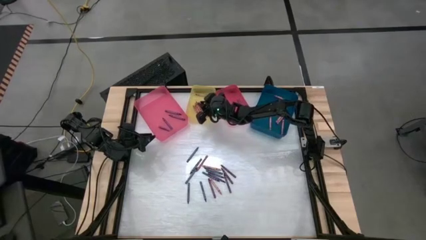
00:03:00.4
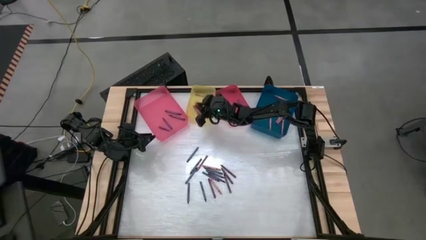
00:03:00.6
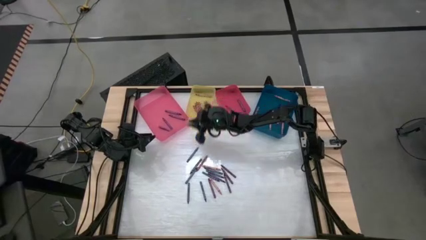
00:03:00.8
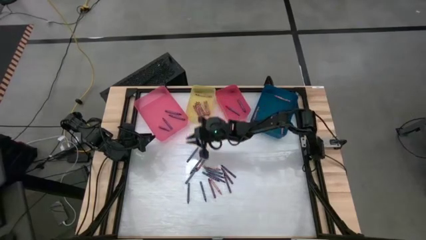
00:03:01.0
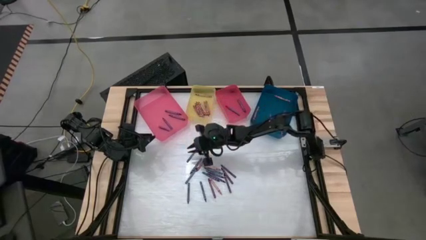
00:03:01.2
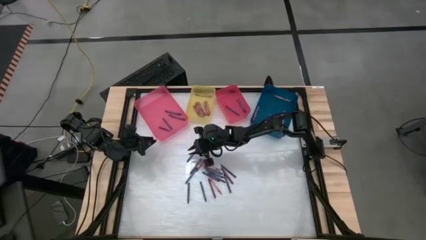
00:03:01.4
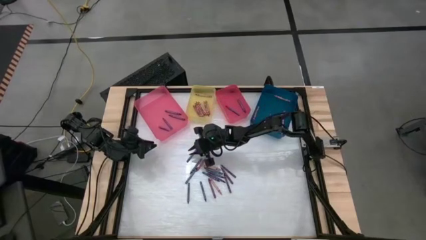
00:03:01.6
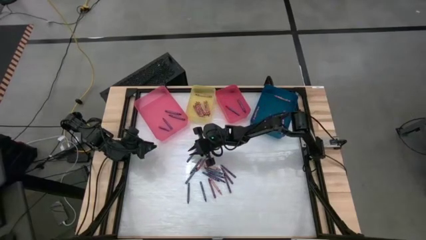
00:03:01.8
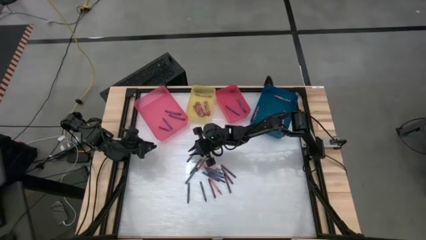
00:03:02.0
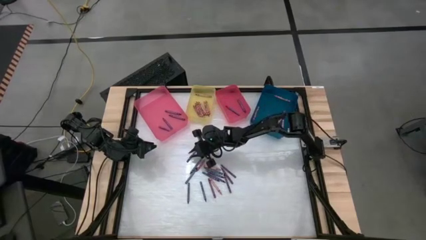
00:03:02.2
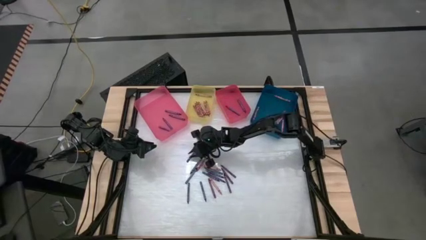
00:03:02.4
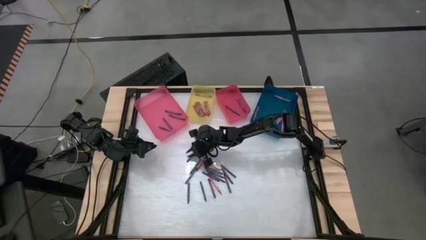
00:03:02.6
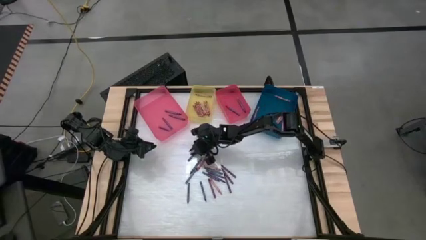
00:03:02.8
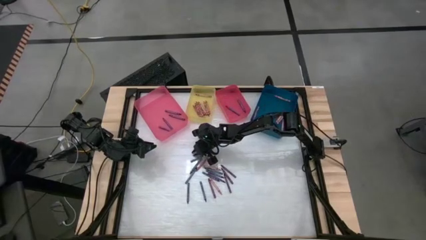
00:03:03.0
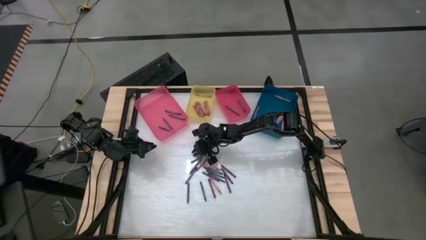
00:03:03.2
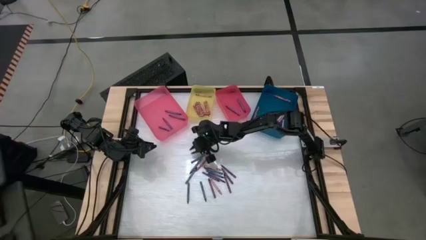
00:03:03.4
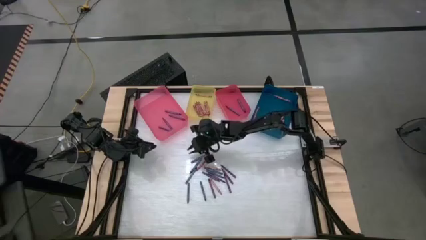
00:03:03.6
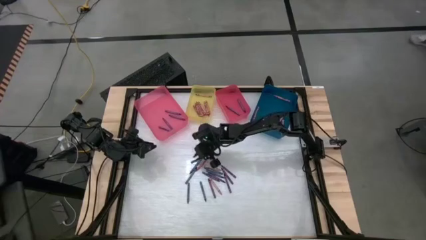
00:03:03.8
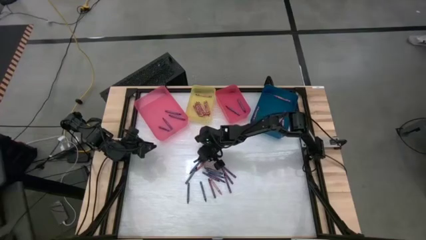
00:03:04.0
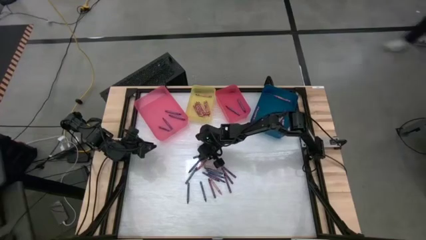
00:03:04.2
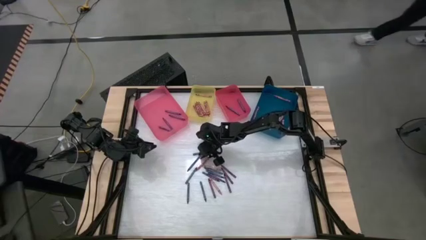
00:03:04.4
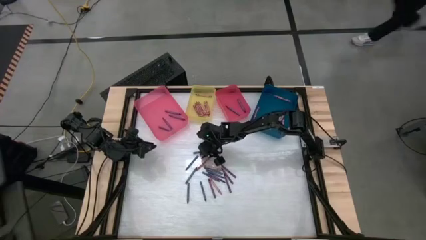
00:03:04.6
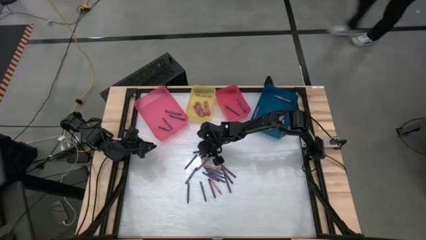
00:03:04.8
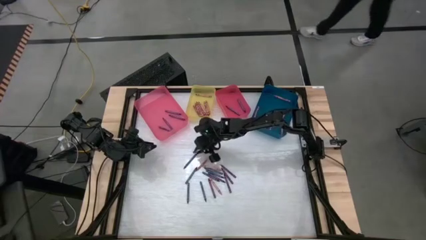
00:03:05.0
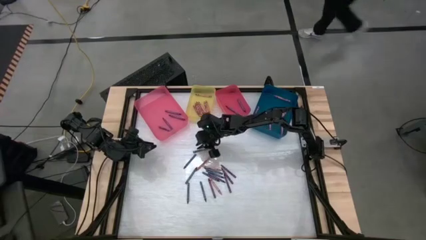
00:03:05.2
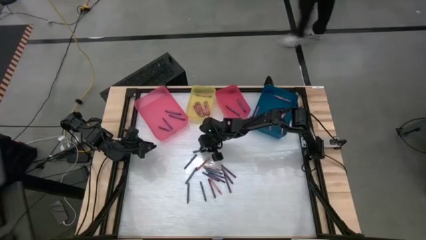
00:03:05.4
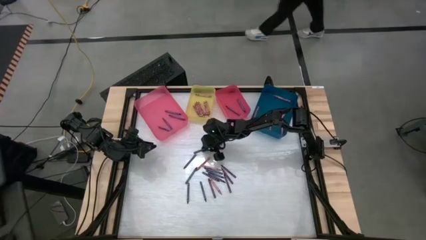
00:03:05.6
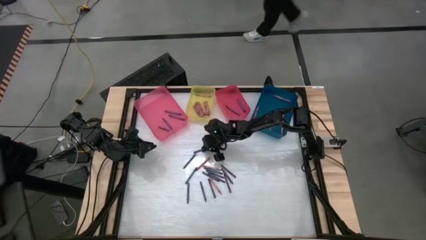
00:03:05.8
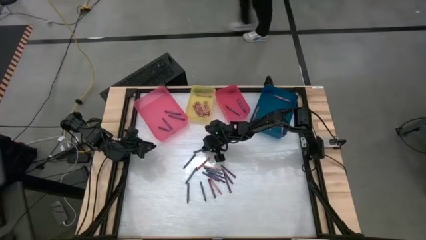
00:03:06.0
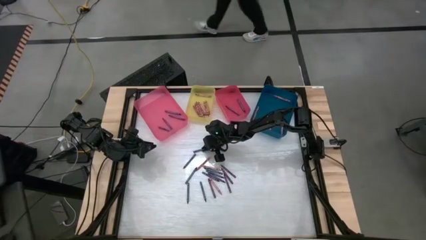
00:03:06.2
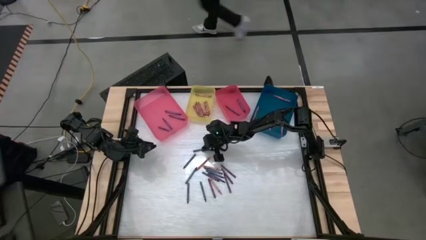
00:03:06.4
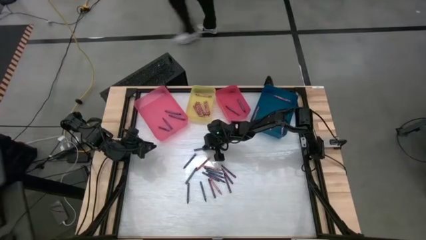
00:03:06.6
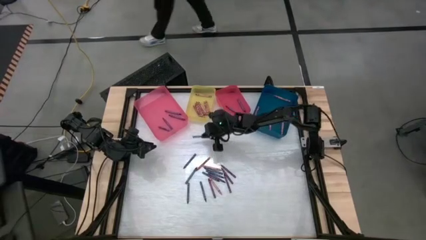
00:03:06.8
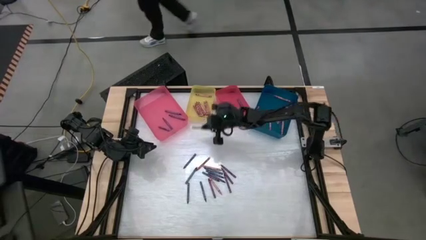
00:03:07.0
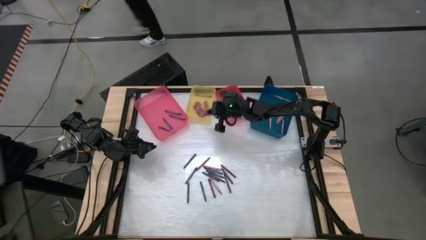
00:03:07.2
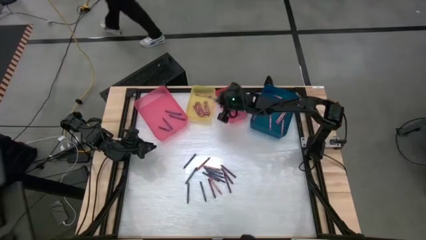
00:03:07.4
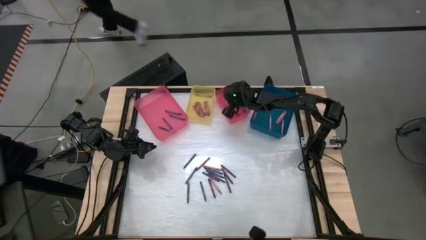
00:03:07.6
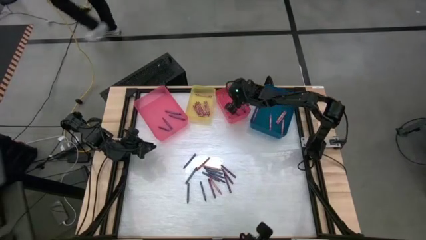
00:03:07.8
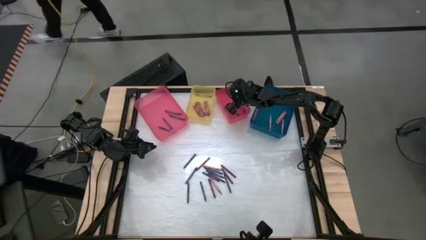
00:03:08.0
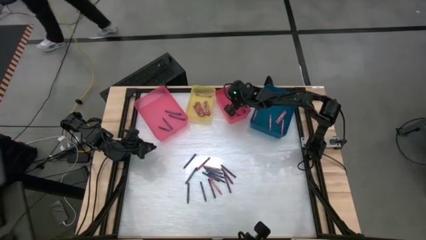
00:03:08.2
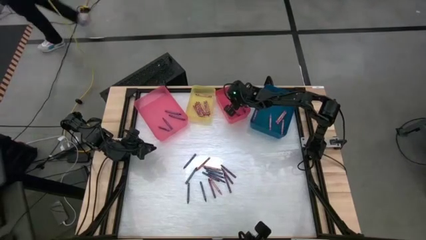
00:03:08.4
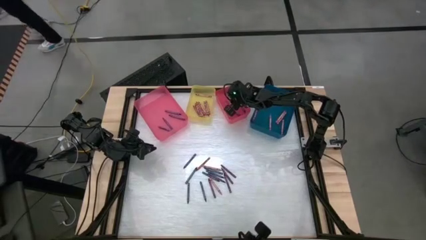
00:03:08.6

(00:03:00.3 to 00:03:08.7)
Task: Sort crayons
Put the blue crayon into the red bin

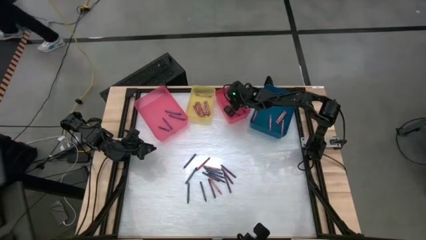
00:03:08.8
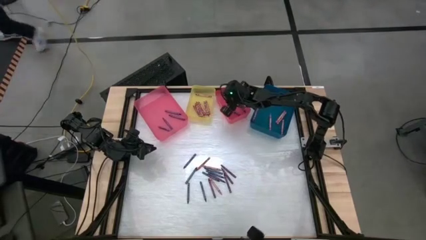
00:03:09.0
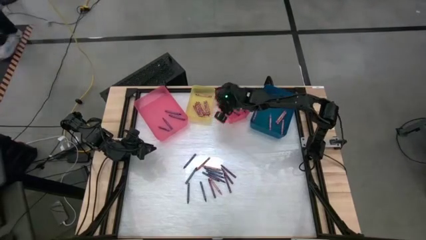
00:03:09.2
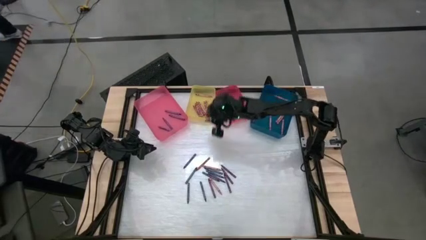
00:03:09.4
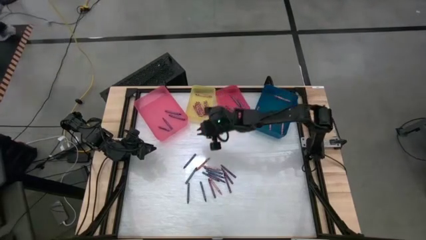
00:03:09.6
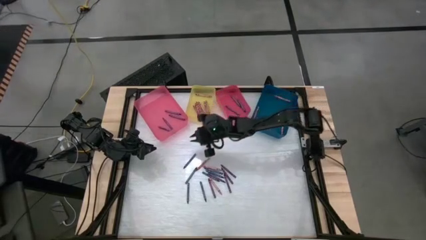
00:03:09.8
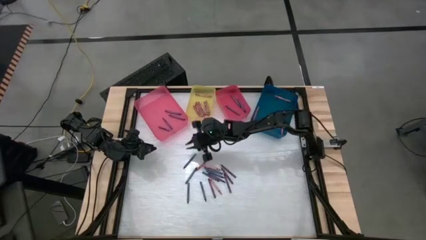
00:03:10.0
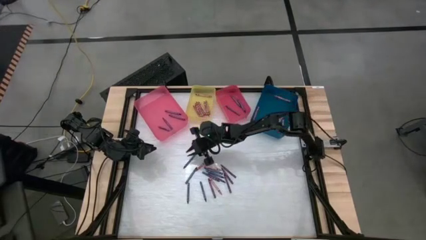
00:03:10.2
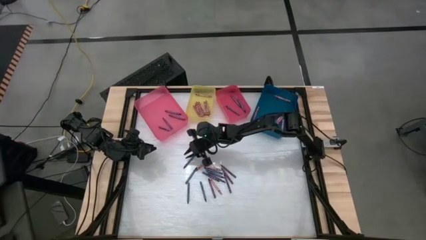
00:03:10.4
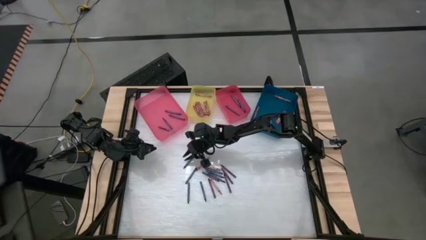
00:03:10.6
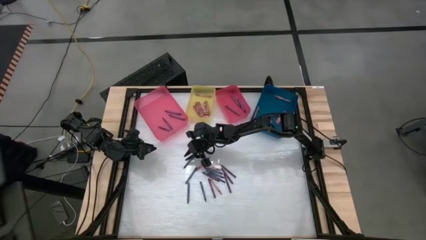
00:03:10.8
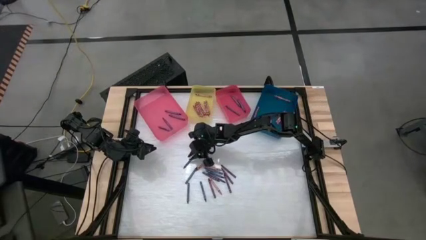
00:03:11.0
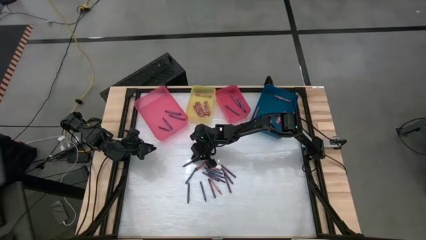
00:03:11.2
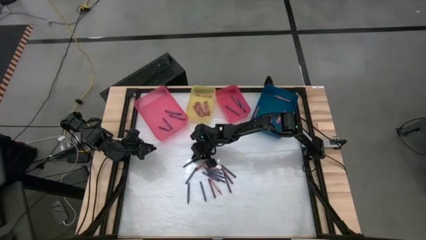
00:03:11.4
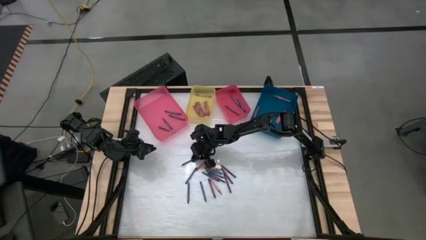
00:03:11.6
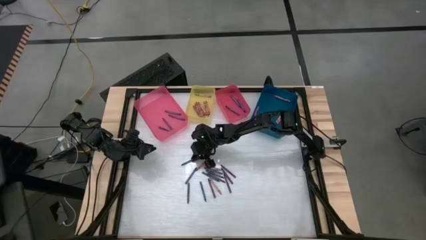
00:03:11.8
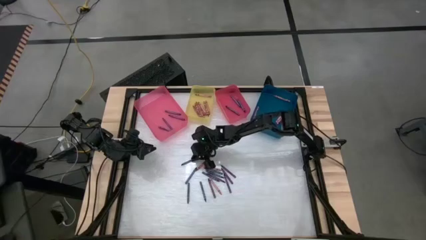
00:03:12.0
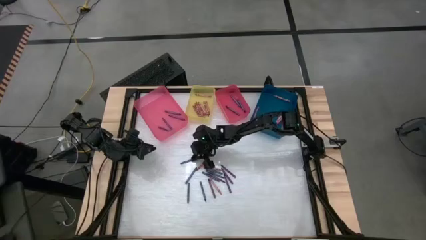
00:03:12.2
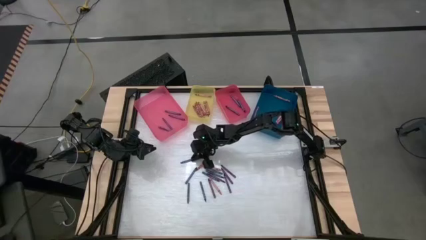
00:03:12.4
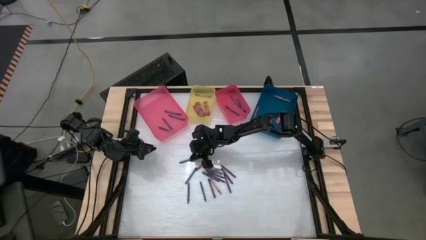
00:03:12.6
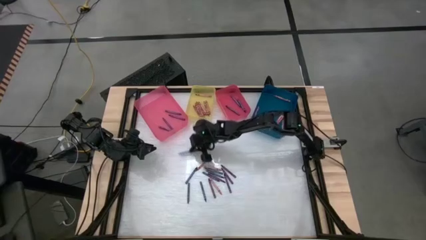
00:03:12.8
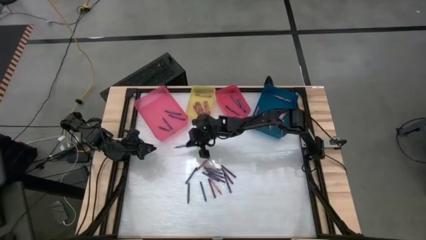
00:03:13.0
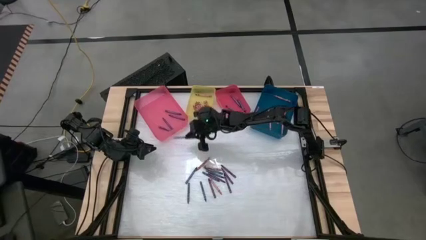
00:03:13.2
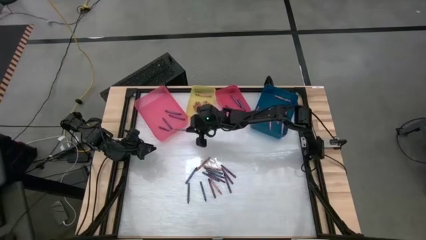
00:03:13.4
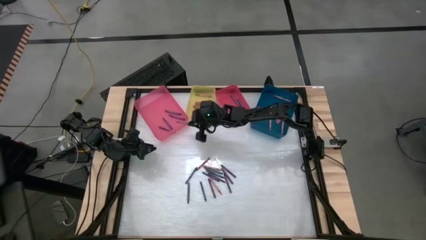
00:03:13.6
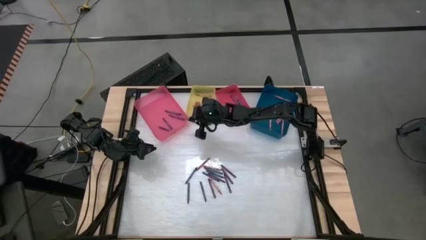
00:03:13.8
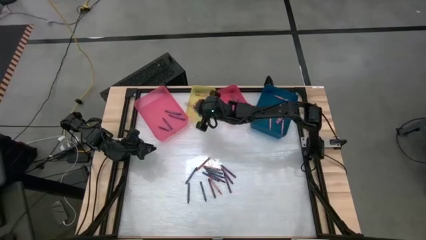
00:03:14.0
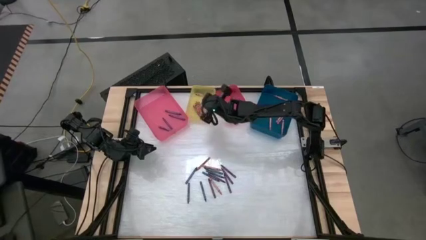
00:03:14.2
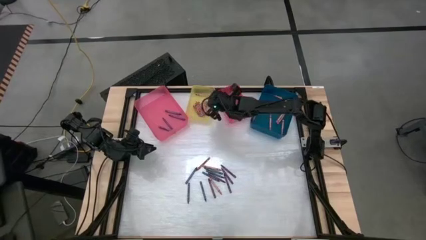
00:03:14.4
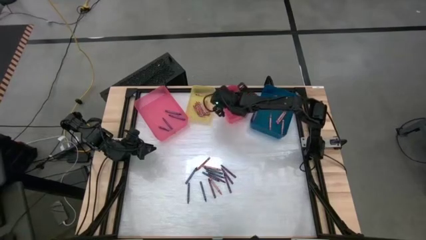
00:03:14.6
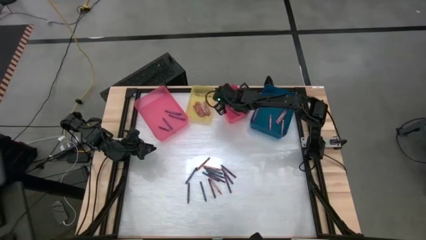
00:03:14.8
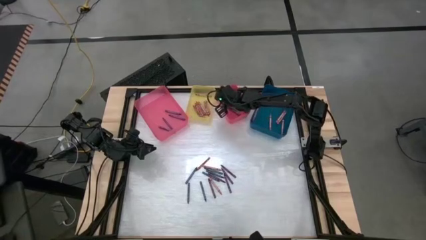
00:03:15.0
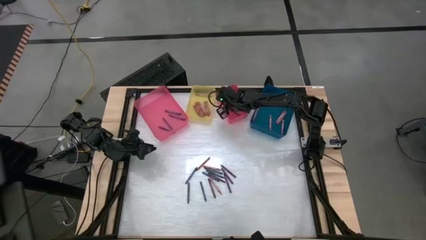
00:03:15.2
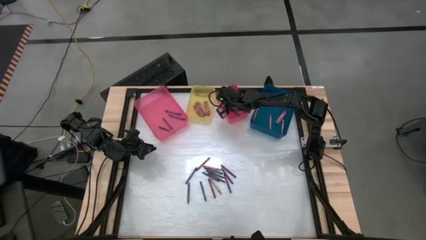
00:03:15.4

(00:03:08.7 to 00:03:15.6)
Put the blue crayon into the red bin
